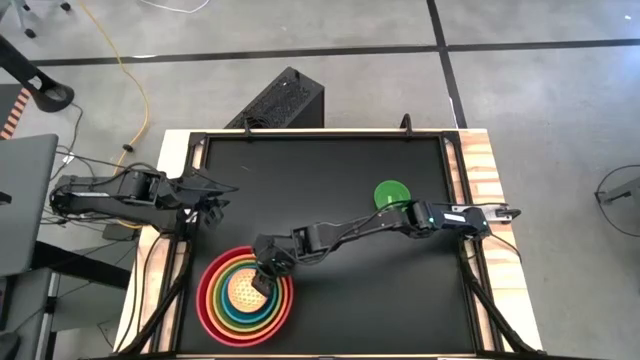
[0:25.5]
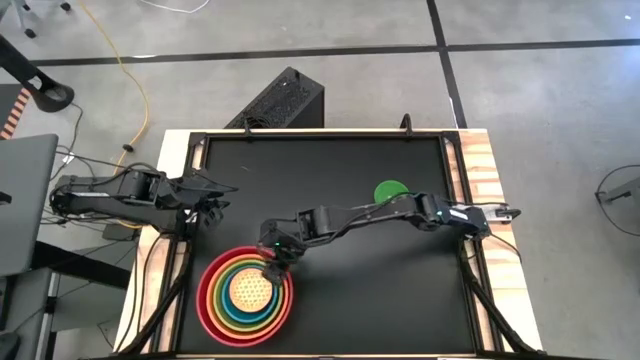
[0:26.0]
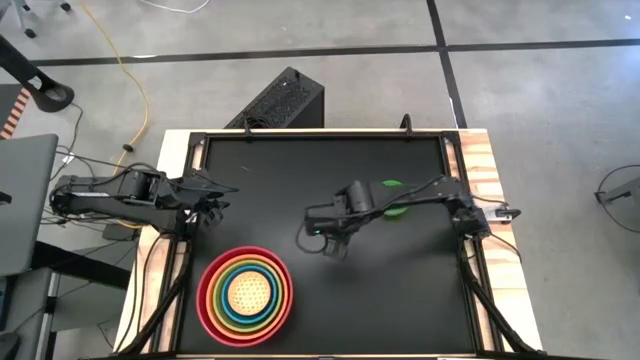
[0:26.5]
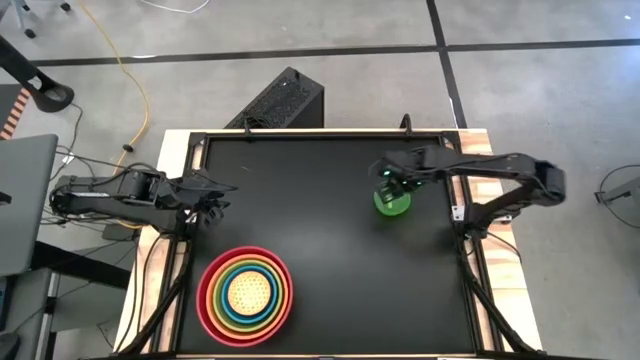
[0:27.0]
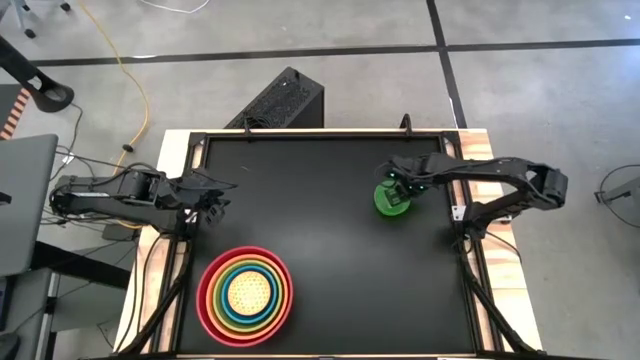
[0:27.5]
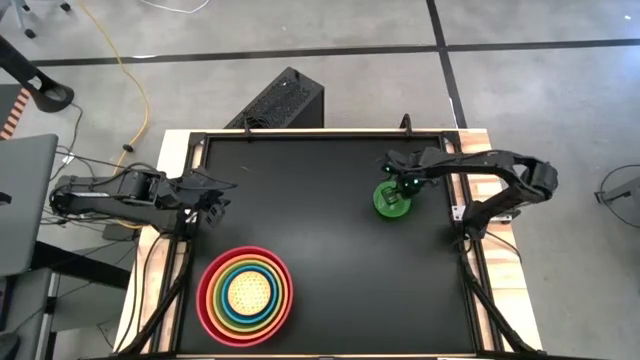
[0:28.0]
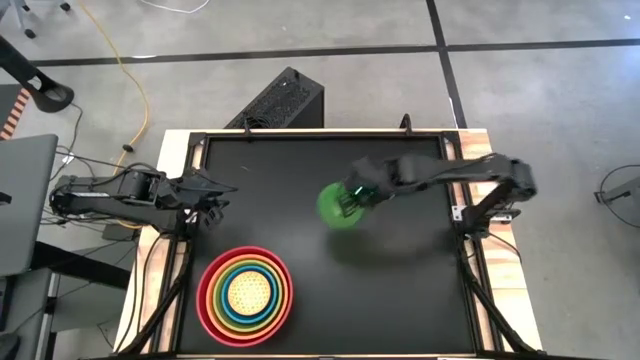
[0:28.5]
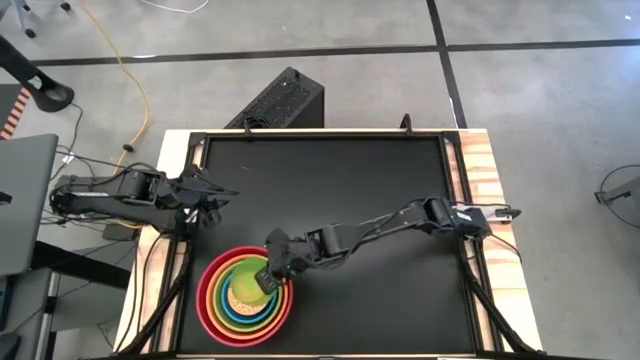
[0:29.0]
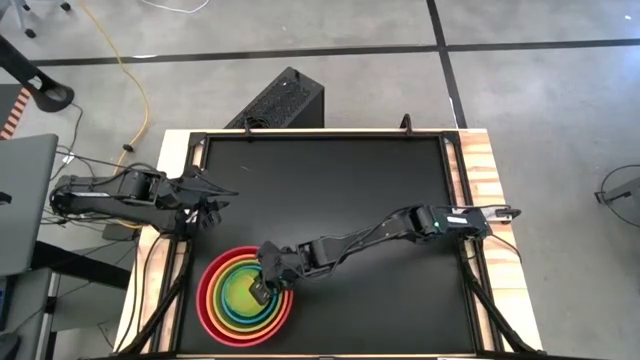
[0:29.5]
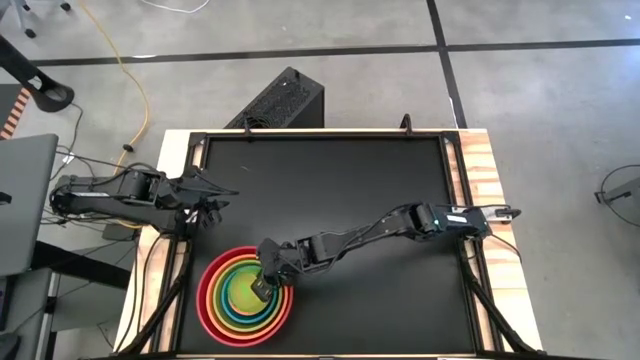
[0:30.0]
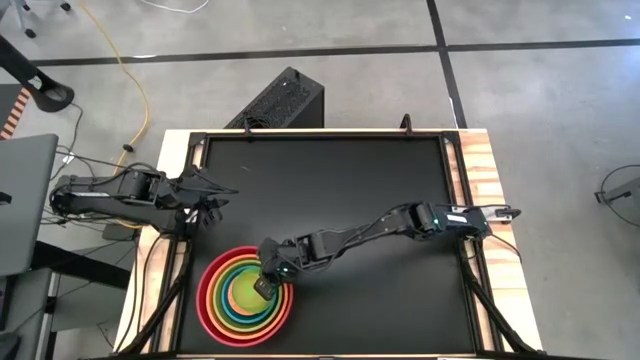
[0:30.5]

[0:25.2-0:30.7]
Stack the green bowl on top of the orange patterned bowl

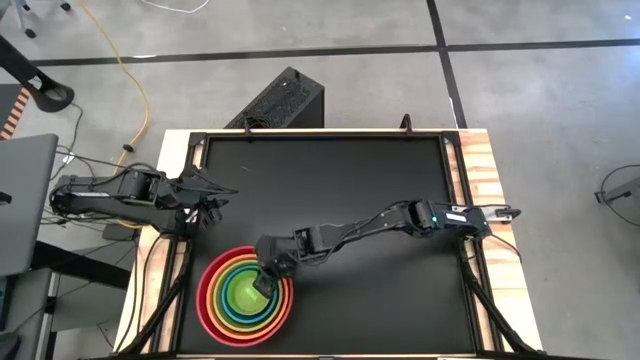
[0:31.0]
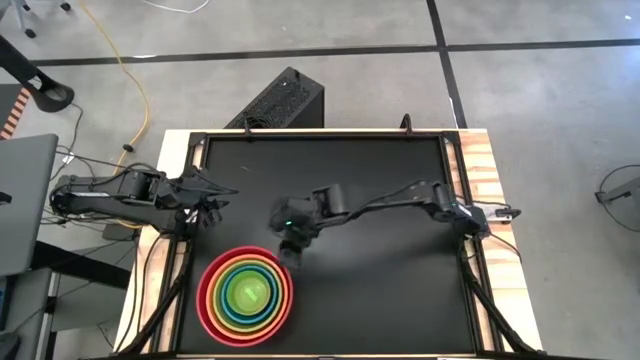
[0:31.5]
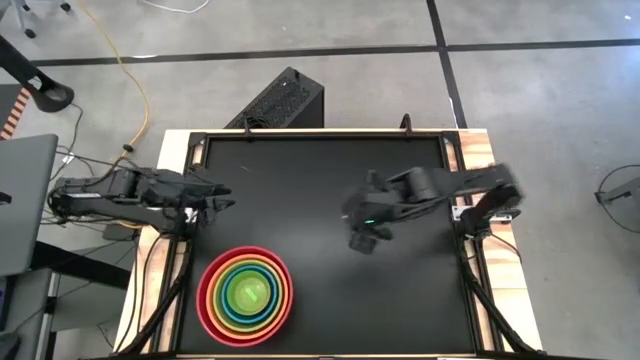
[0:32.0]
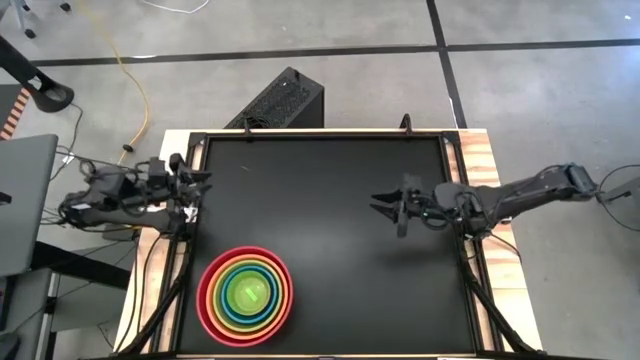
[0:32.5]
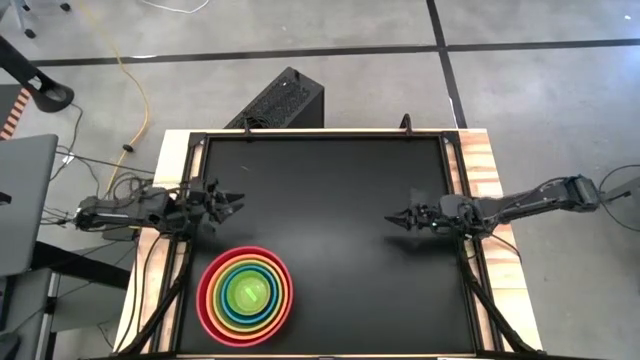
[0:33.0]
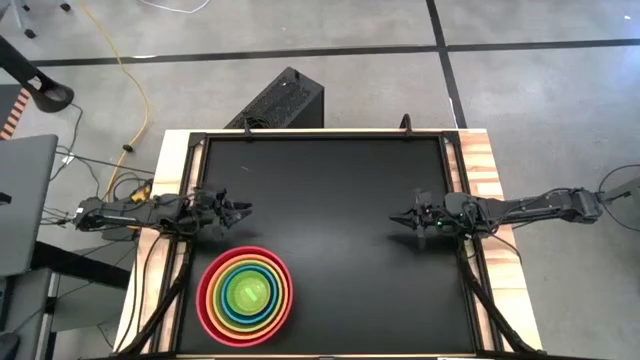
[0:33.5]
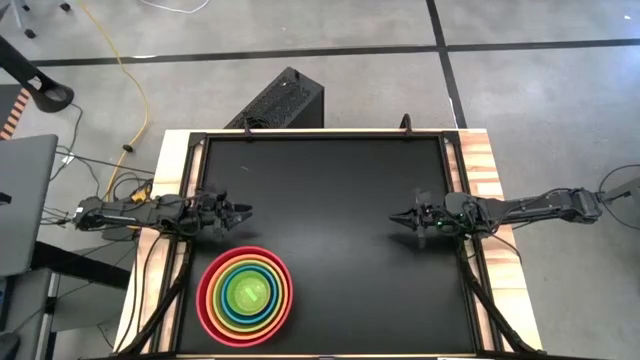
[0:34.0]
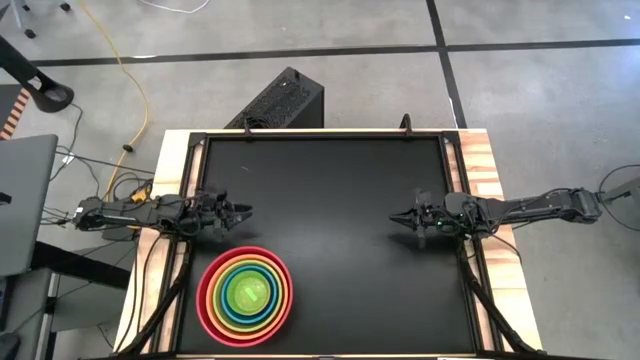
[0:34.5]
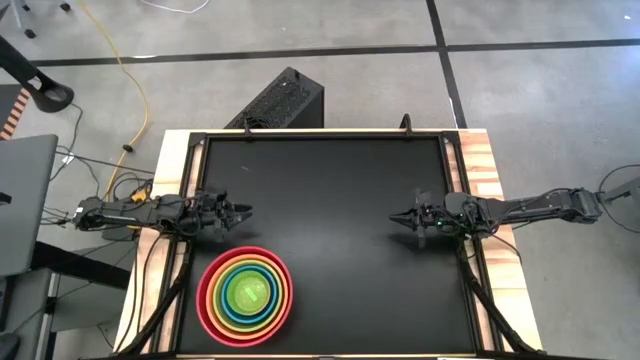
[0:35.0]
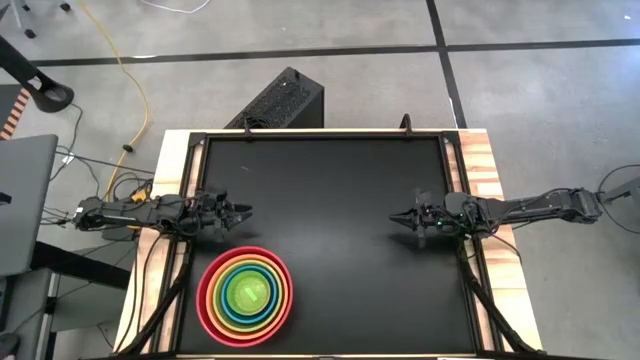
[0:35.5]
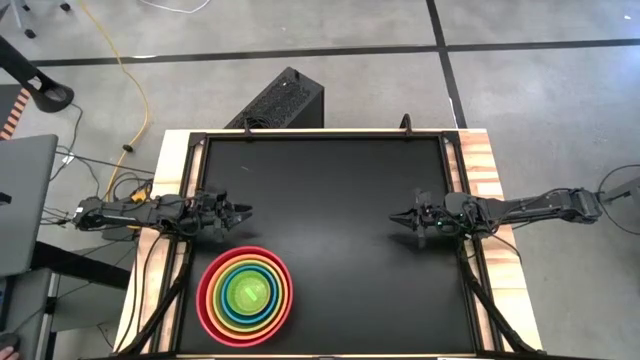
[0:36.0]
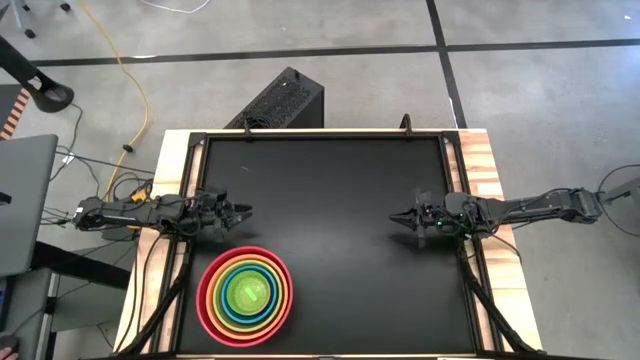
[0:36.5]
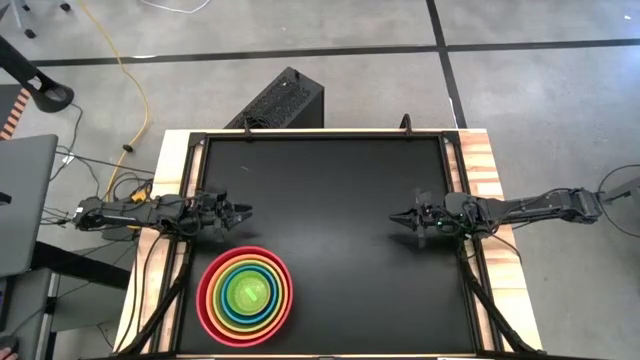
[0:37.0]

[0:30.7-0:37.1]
Return To Home Position

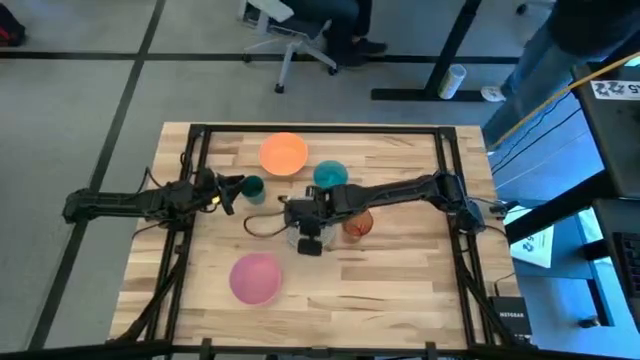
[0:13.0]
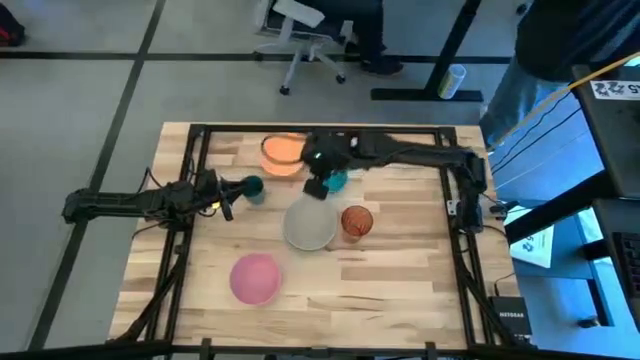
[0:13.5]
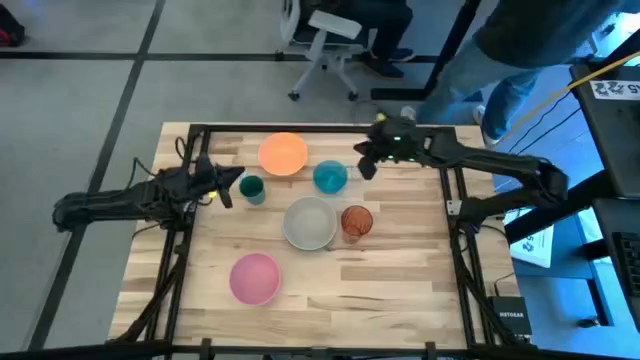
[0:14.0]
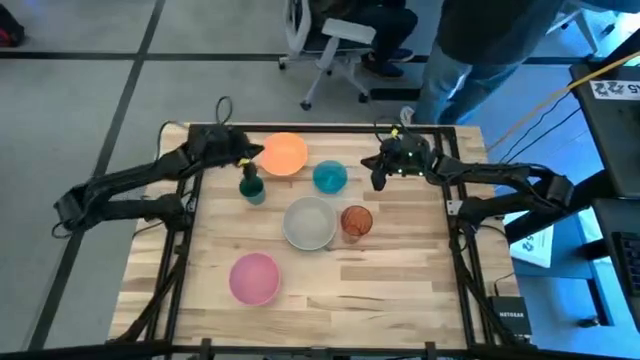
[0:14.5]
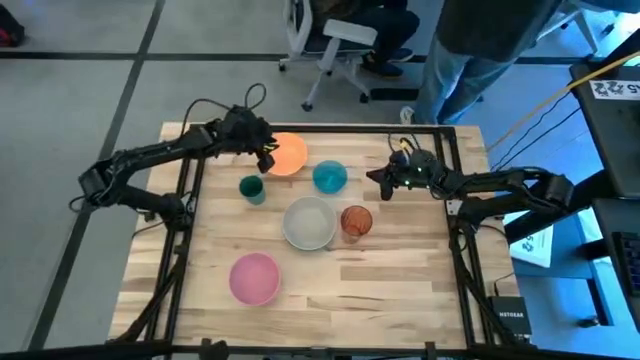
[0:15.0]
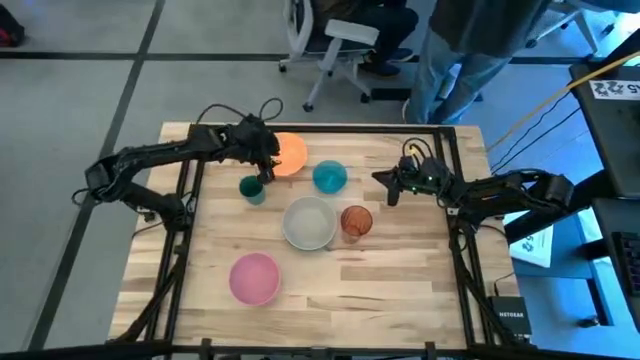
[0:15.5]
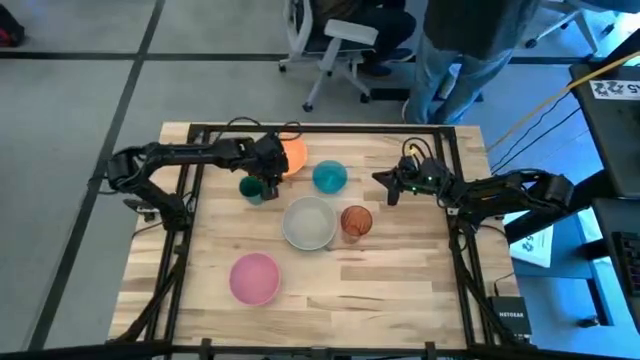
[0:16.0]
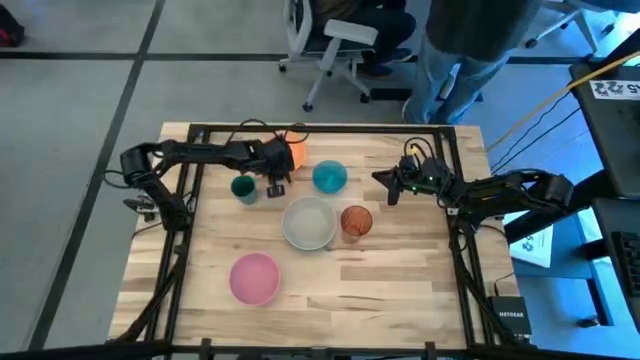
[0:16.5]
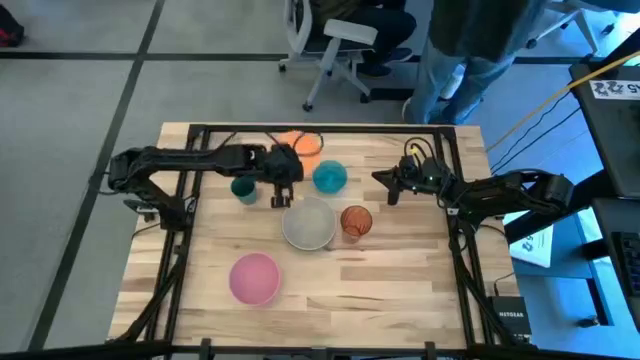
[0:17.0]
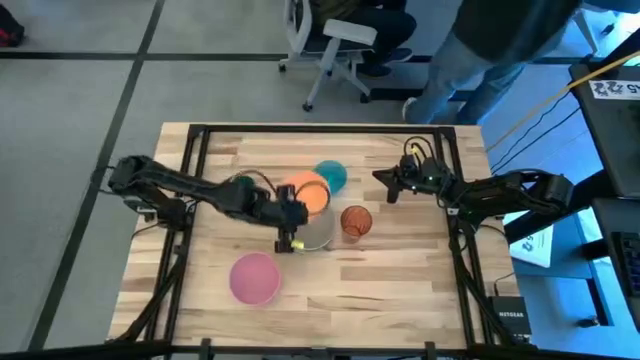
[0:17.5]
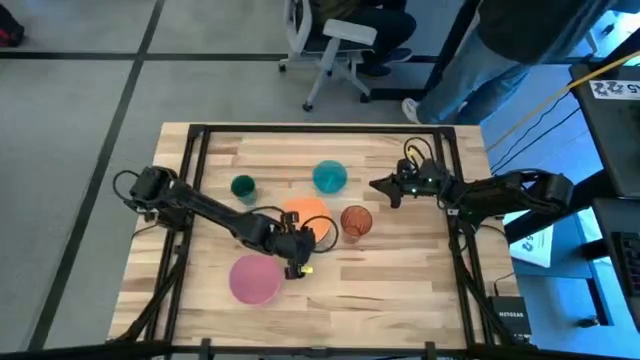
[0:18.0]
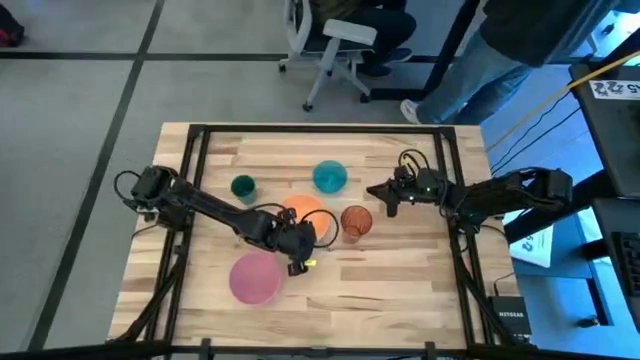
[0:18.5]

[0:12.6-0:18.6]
Stack the orange bowl on top of the gray bowl

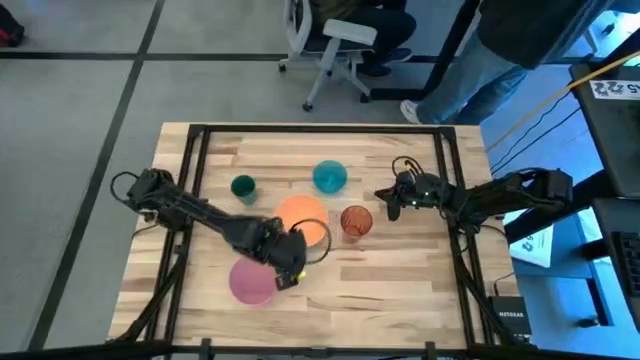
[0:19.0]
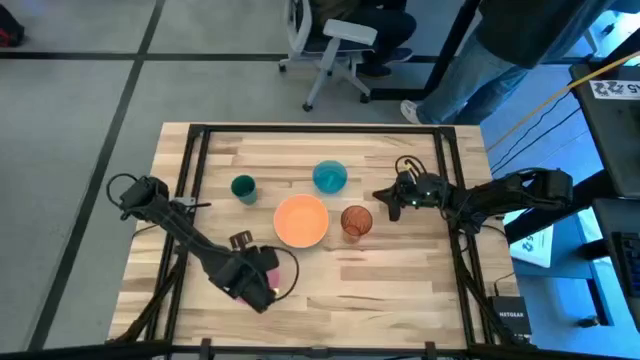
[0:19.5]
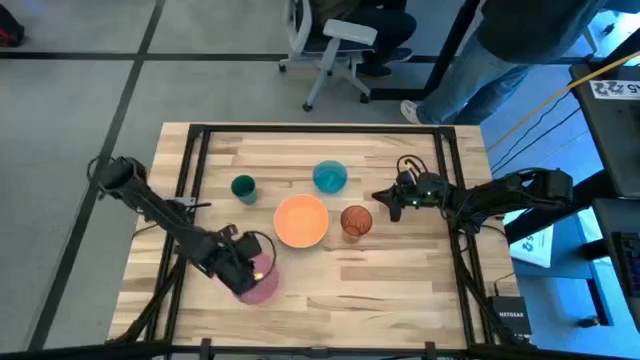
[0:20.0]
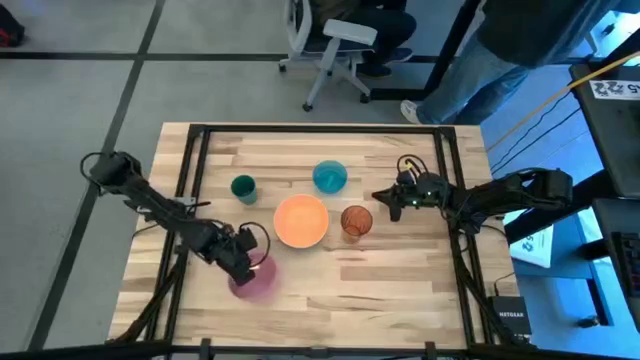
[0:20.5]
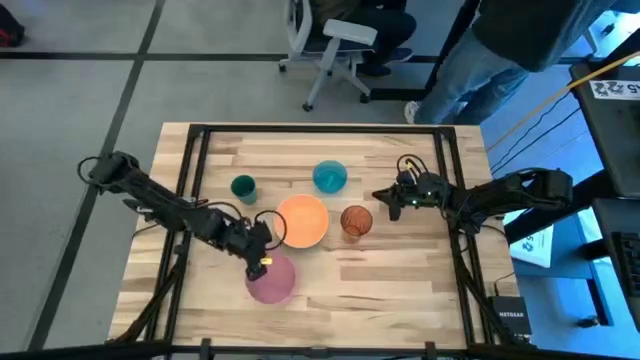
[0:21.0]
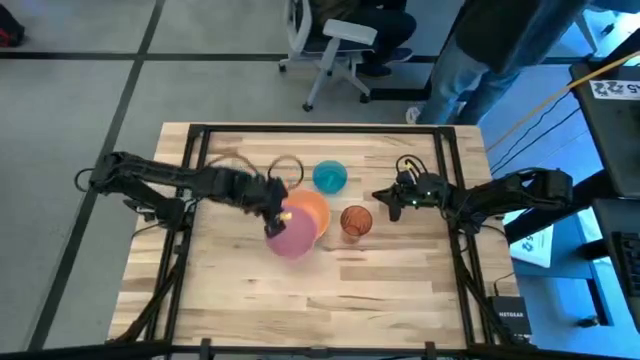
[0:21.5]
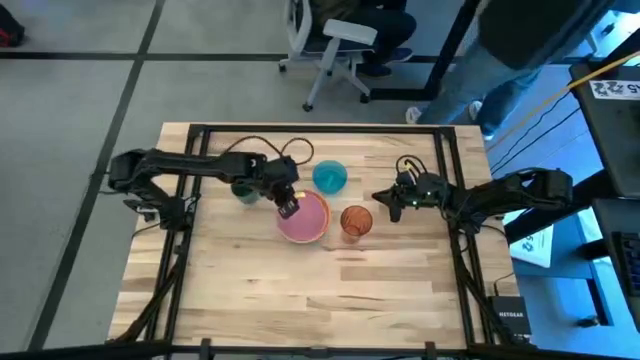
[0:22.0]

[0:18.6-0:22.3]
Stack the pink bowl on top of the orange bowl

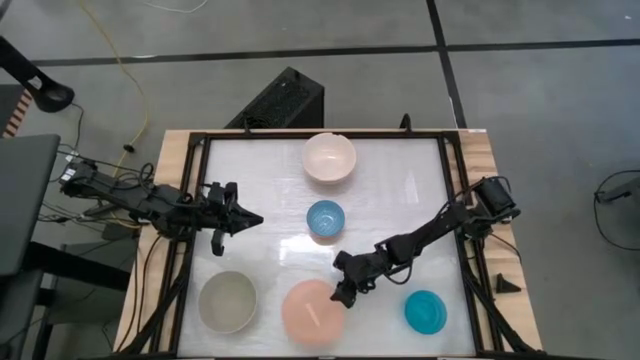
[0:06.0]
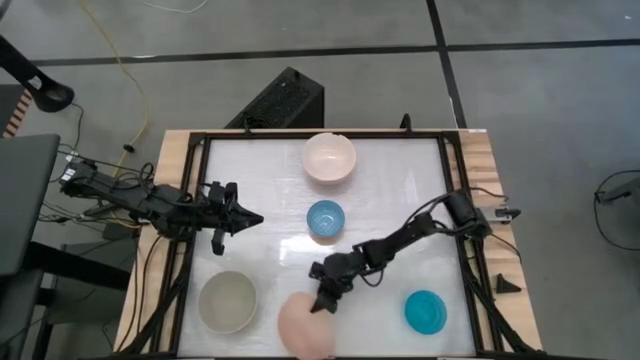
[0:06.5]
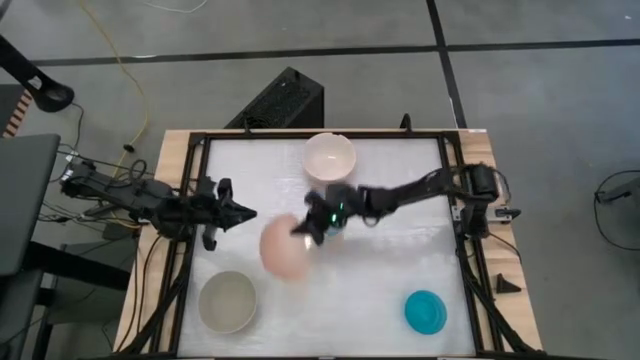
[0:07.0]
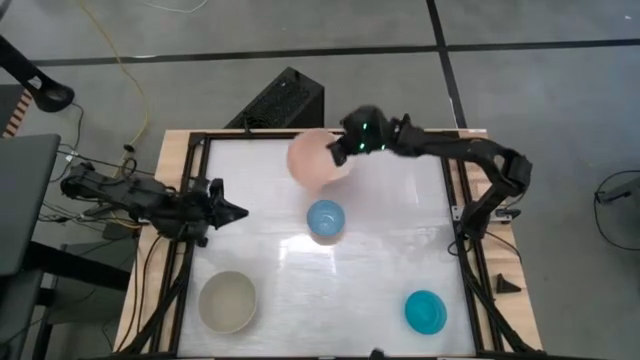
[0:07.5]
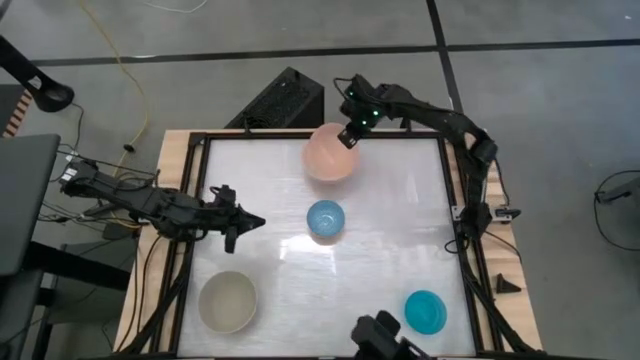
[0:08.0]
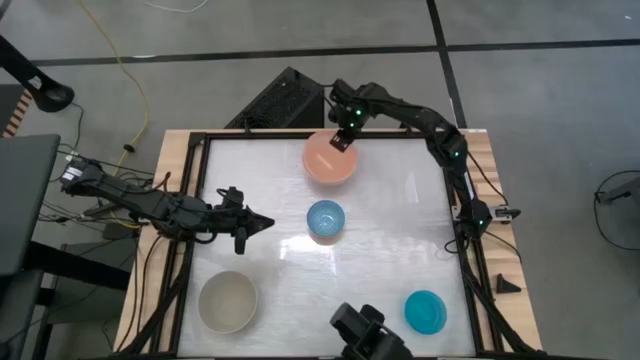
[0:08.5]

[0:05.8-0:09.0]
Stack the orange bowl on top of the white bowl
